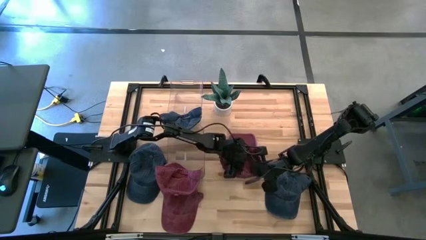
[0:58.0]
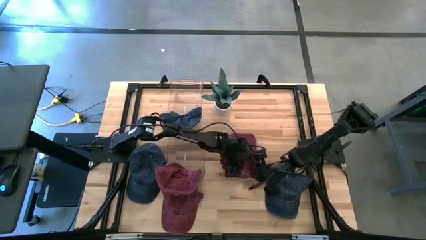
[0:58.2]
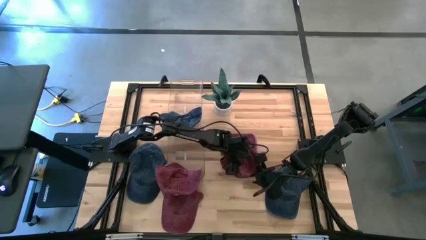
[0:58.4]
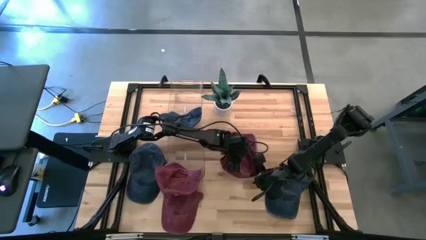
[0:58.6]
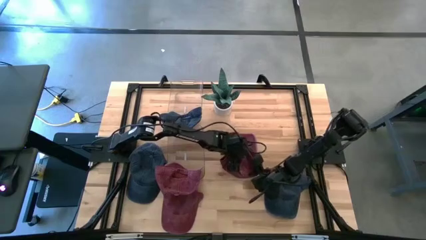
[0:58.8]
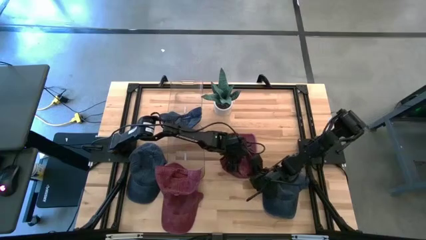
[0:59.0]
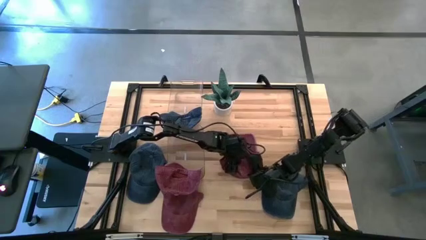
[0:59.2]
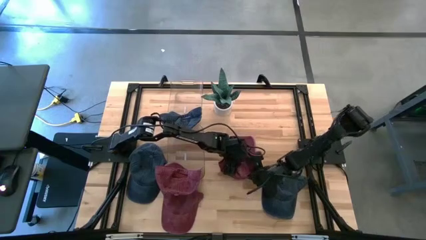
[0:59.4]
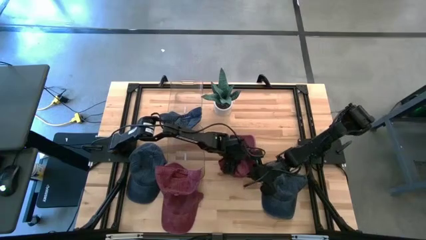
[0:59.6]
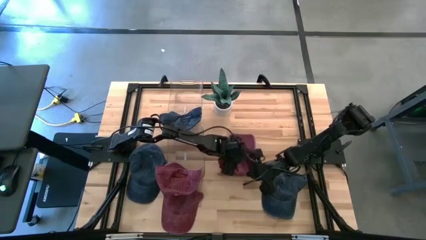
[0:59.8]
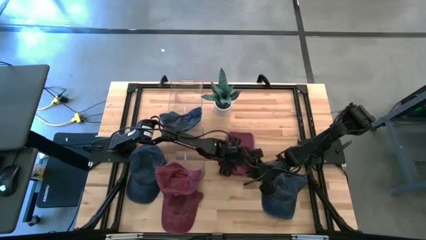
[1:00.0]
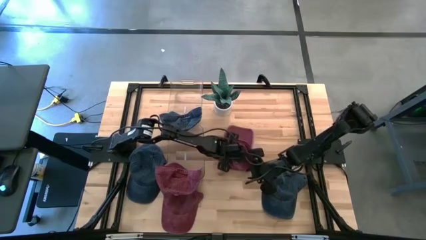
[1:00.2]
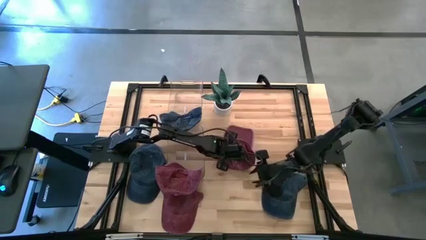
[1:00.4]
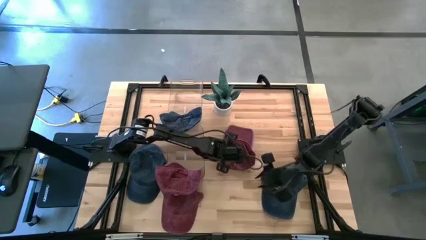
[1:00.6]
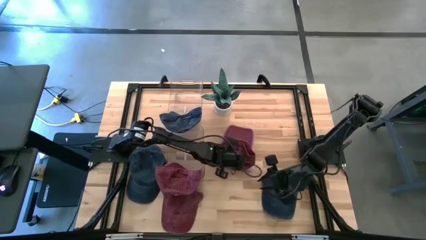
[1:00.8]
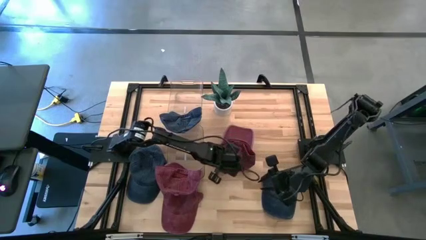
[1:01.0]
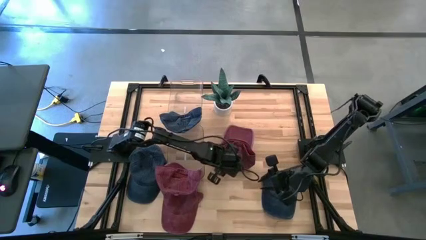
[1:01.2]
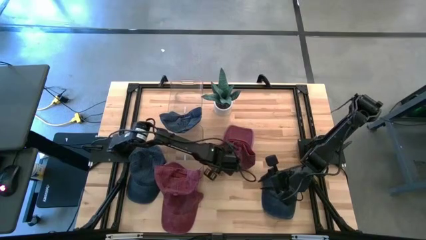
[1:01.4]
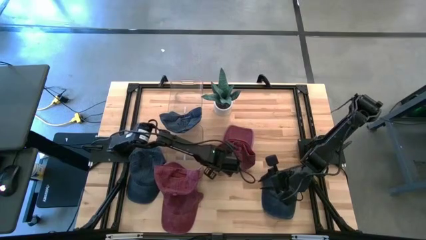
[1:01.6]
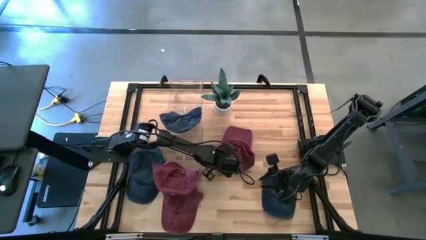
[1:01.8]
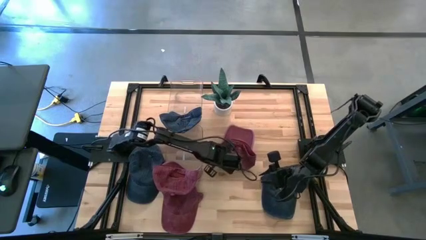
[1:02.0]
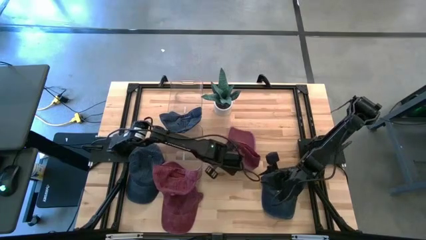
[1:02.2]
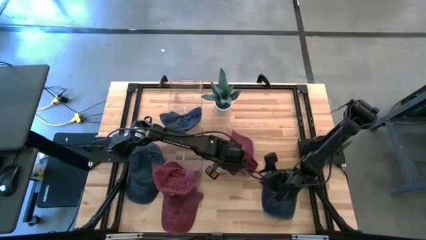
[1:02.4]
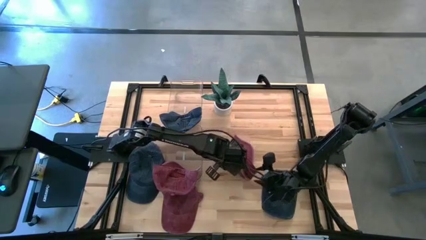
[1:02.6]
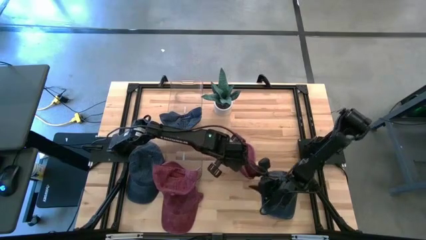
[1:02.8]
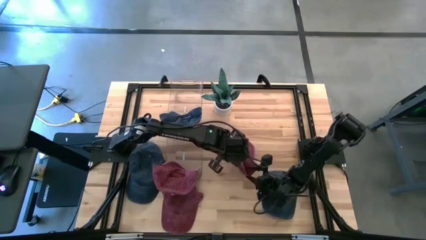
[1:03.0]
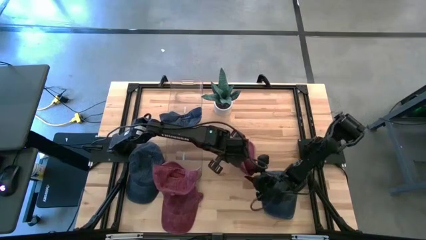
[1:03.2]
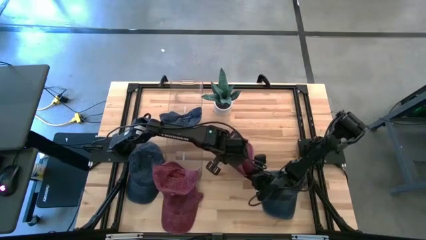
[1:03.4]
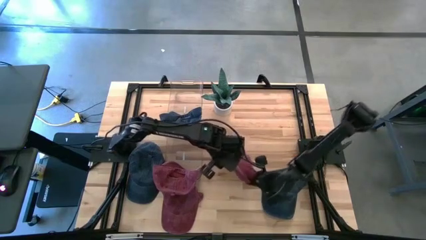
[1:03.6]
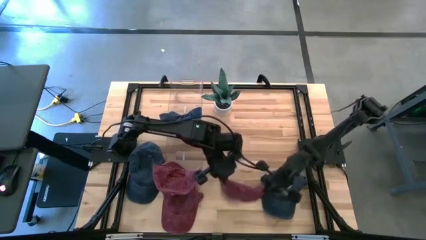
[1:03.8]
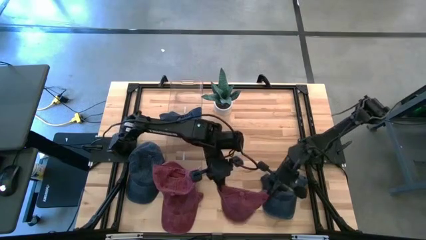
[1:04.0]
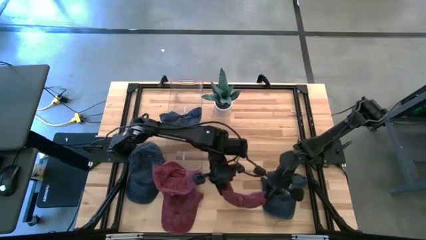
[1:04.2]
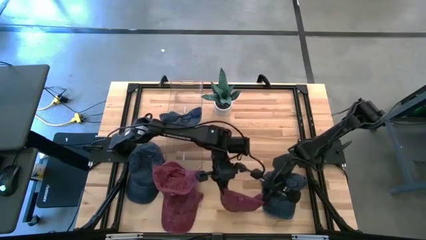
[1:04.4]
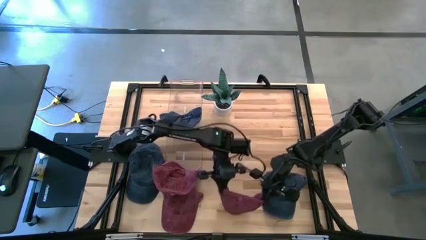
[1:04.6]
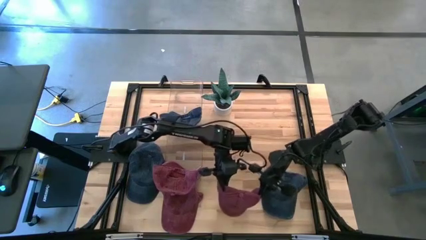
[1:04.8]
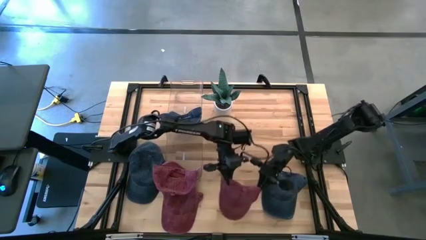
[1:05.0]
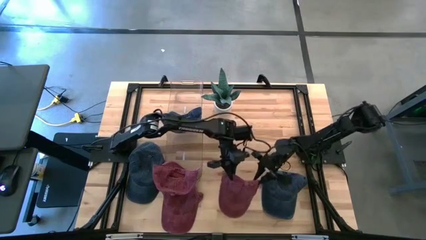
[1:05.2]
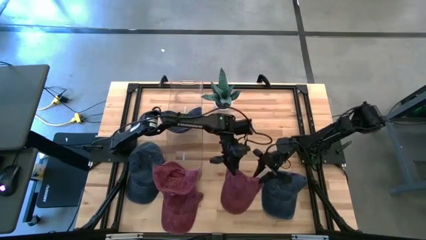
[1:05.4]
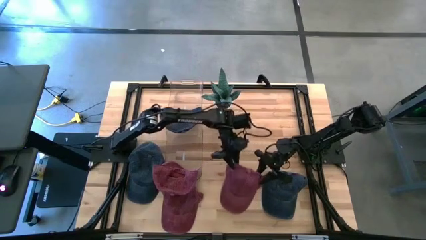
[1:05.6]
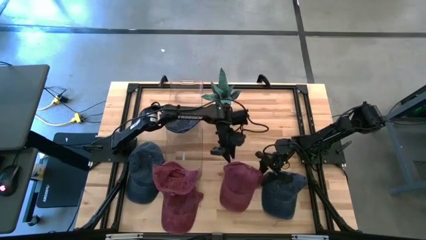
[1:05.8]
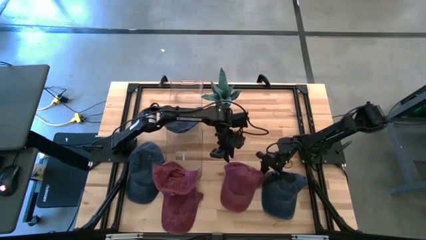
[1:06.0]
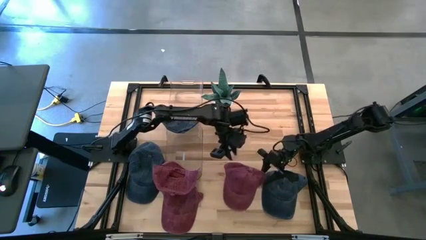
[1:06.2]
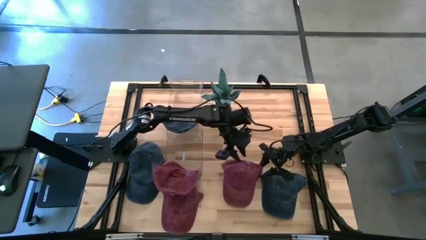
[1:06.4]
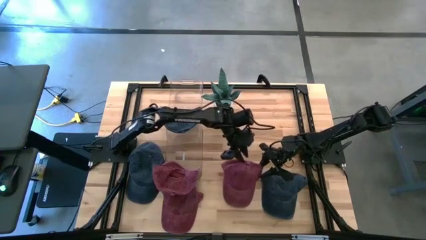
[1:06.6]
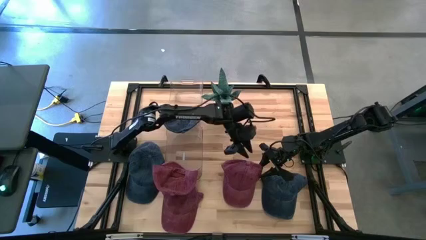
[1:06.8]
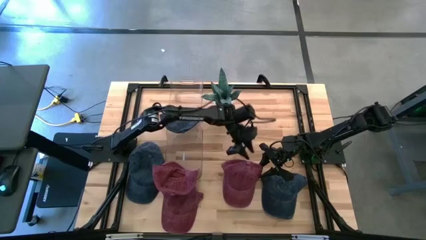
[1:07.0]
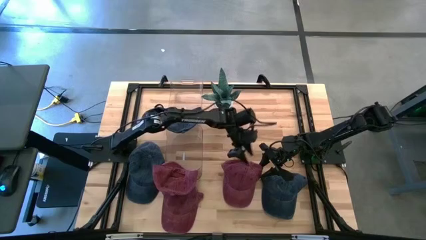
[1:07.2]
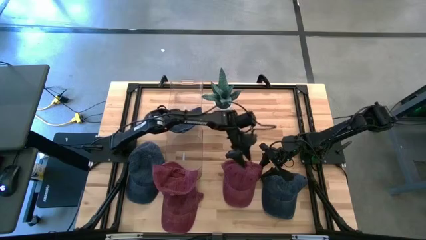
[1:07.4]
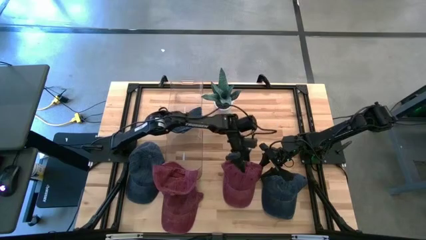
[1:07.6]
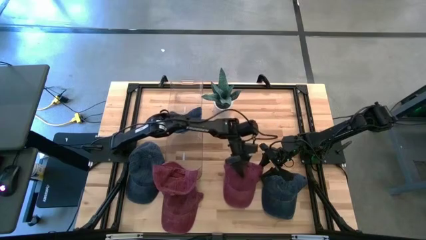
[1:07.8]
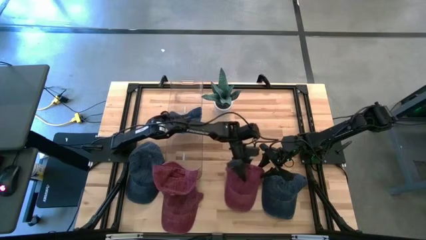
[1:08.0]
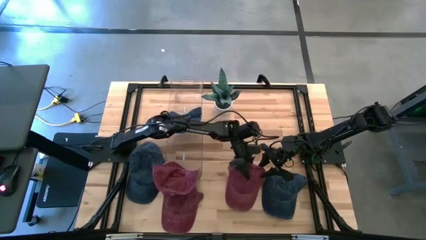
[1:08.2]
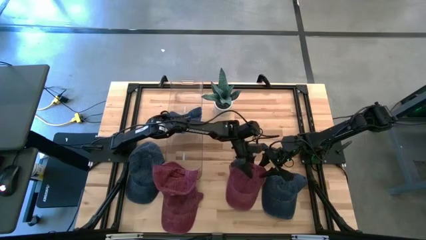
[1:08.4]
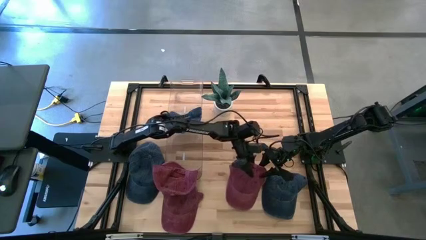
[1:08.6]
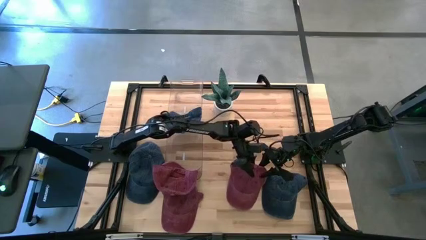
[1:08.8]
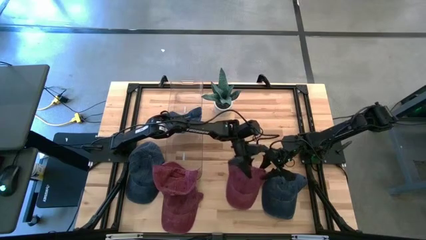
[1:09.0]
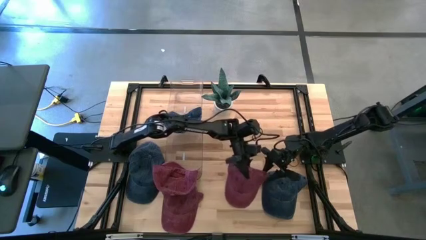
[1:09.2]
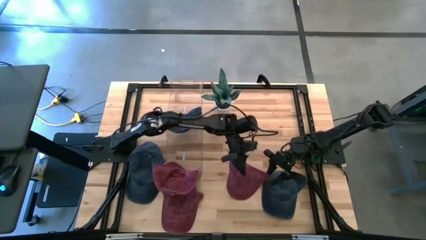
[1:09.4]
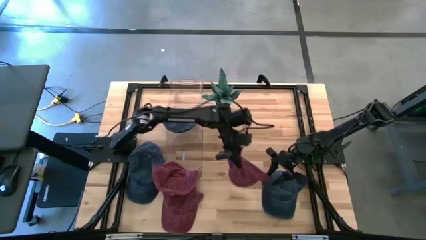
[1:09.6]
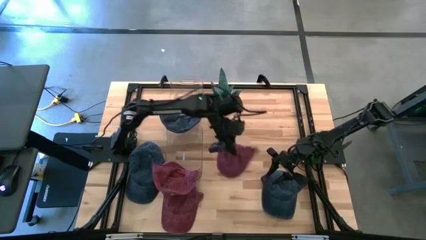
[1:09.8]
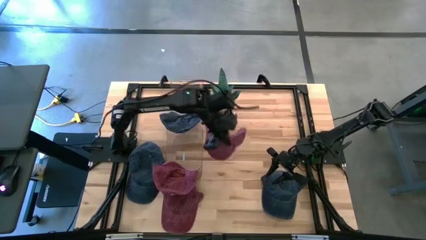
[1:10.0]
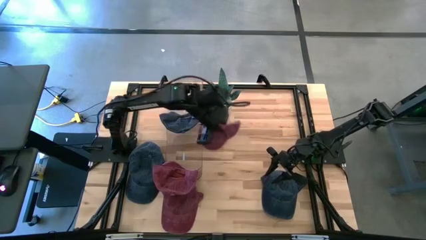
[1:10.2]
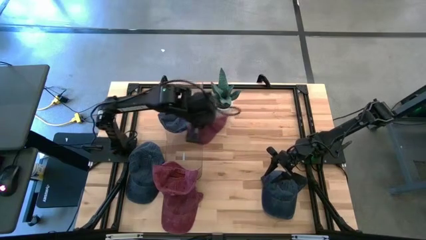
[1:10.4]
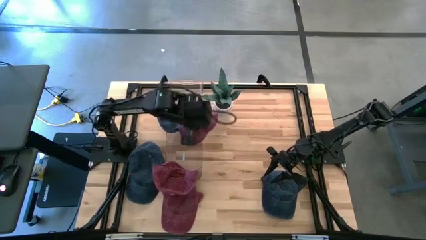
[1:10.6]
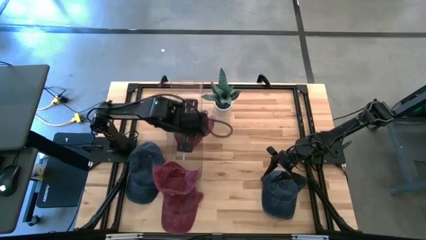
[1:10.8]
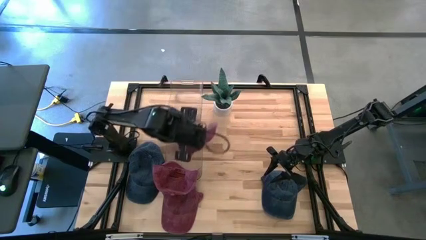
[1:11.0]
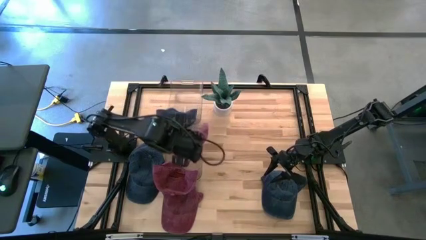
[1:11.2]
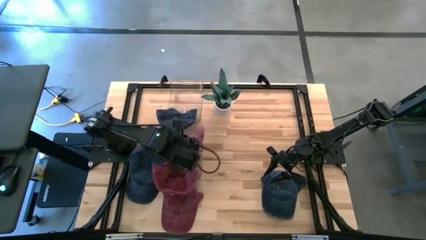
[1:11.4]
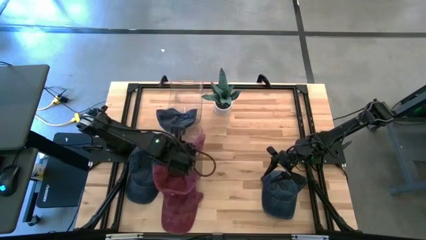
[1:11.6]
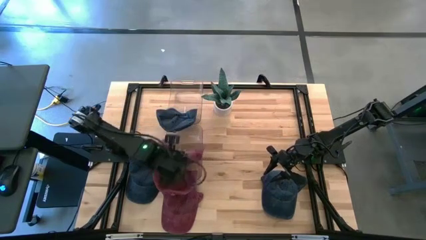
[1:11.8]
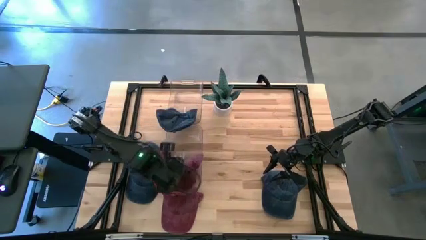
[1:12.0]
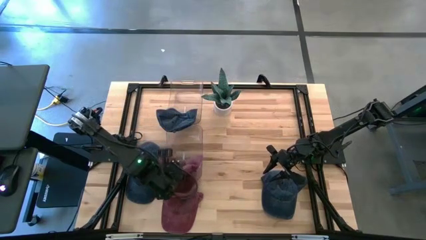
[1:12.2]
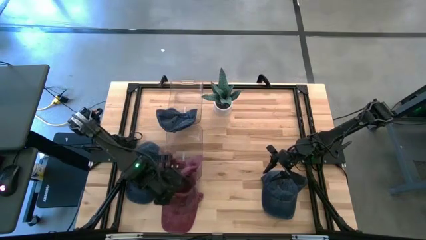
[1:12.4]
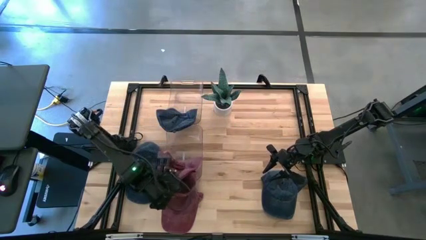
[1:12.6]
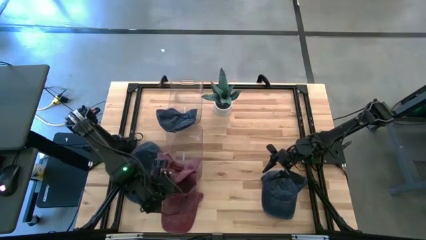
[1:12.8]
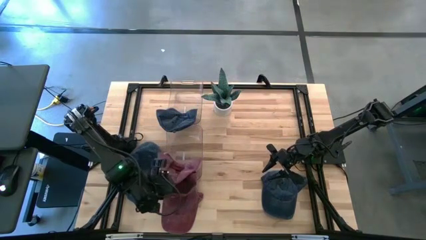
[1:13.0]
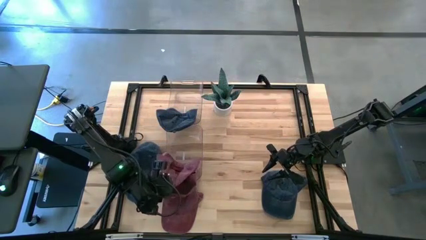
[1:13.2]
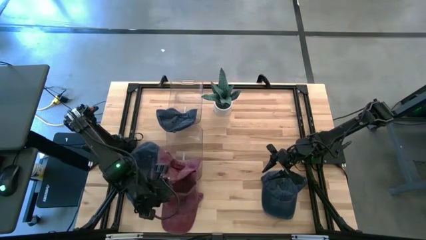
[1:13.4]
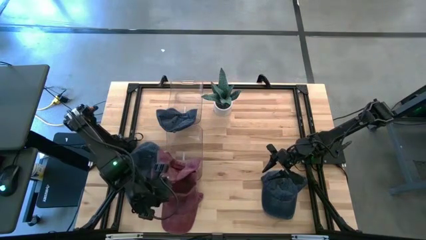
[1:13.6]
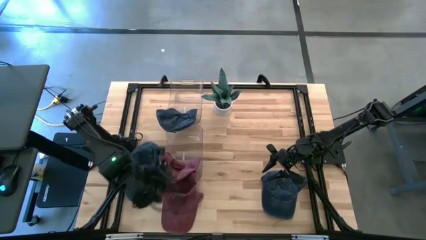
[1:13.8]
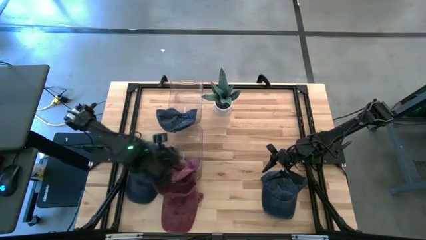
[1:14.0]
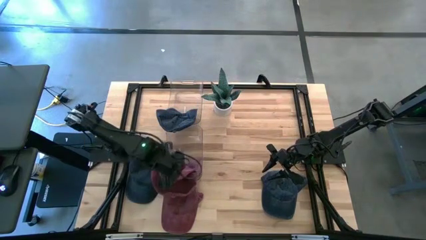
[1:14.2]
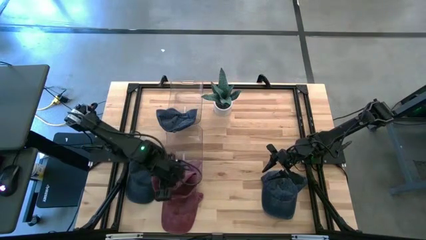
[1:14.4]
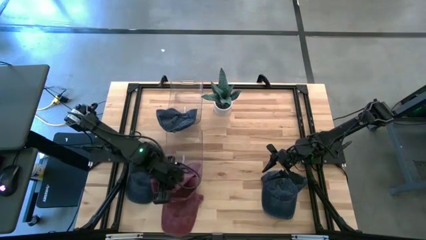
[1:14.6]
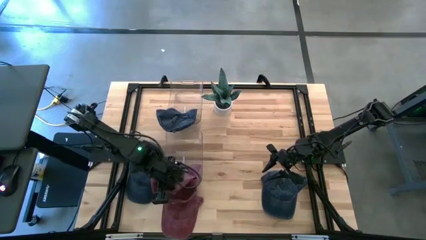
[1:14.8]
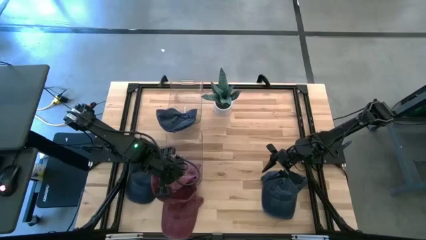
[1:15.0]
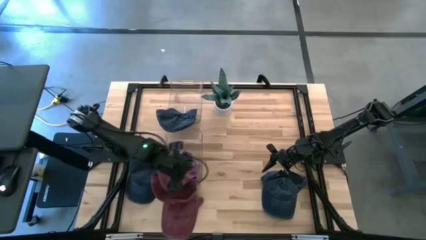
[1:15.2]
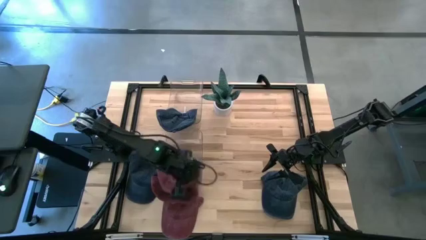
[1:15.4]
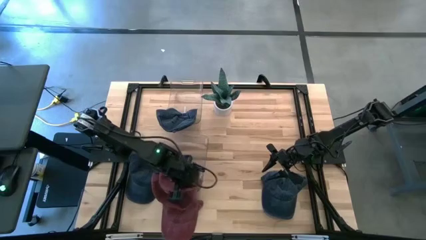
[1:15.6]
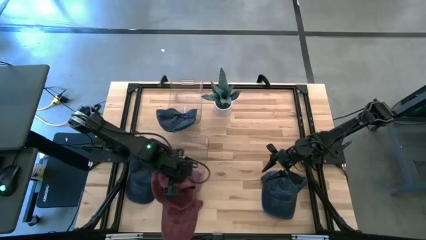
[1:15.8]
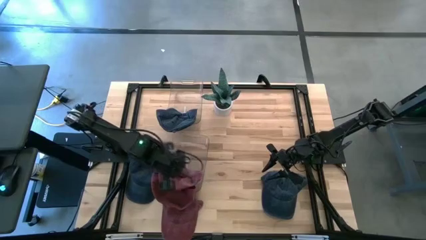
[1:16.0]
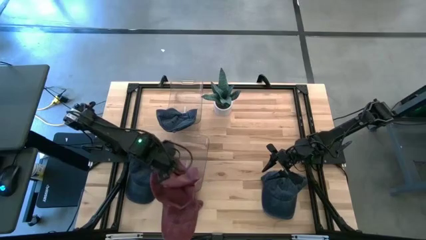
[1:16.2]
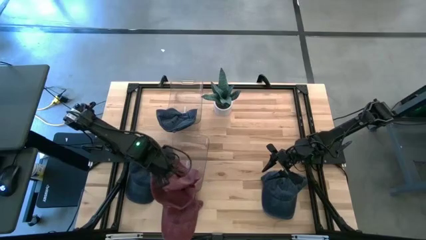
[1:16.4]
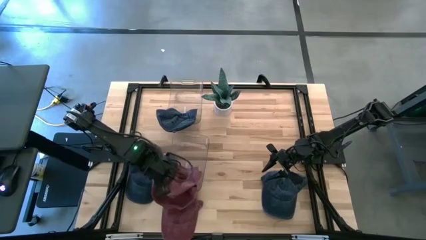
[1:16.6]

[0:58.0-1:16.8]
Task: Pick & Place hat
Put the top red cap into the bottom transparent bin
